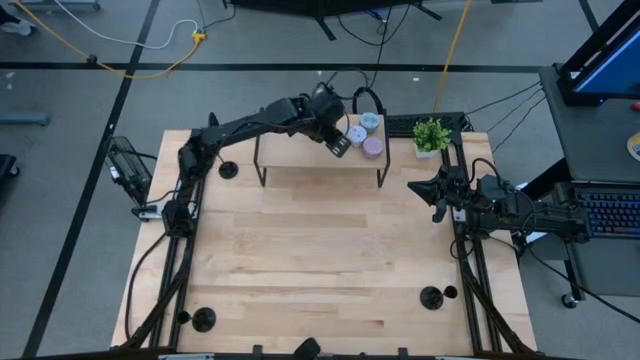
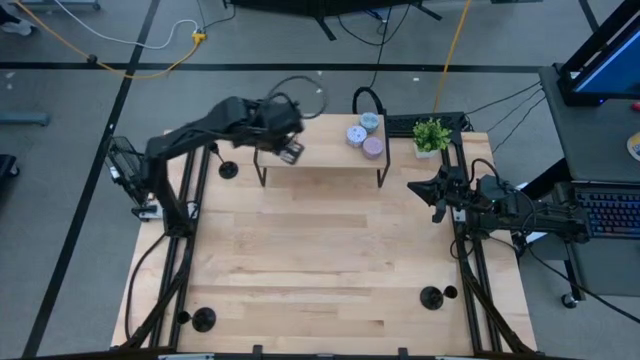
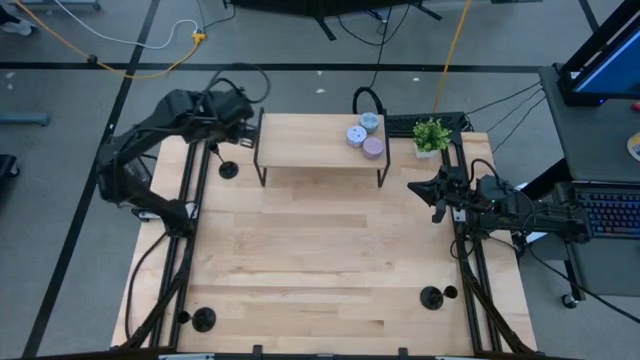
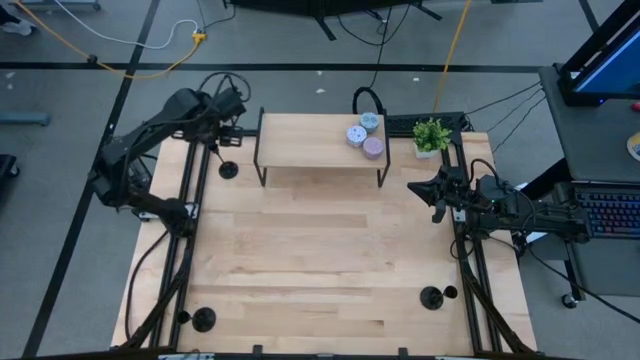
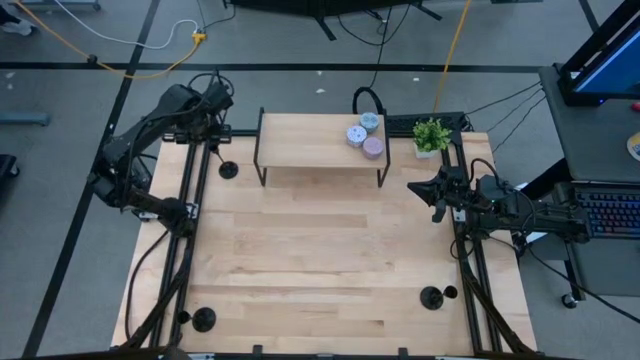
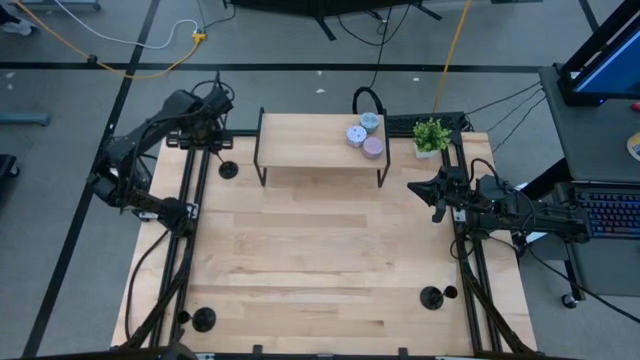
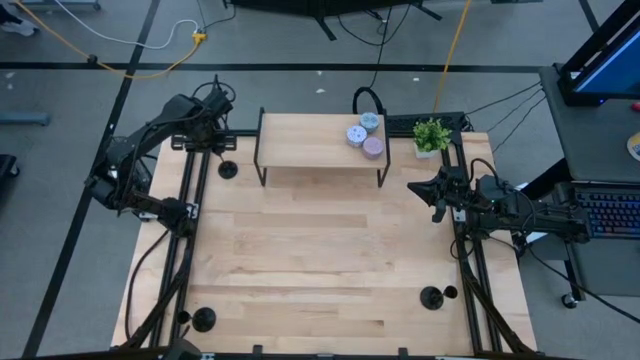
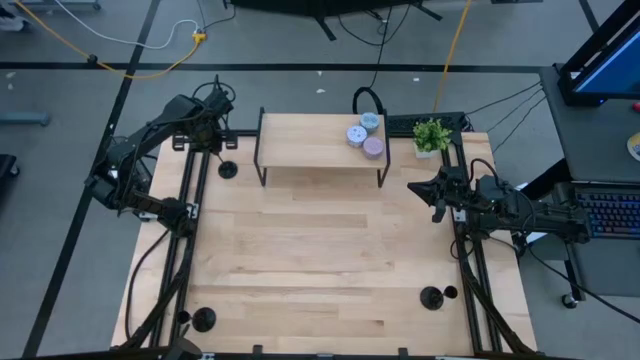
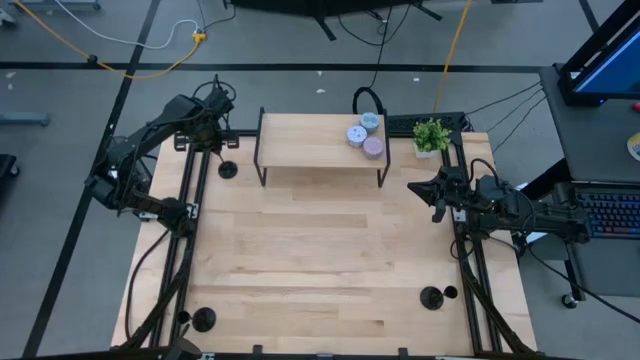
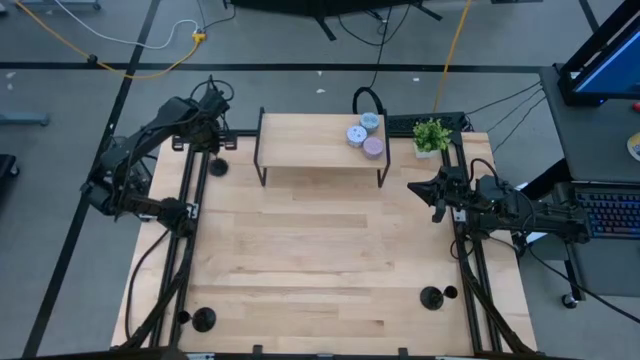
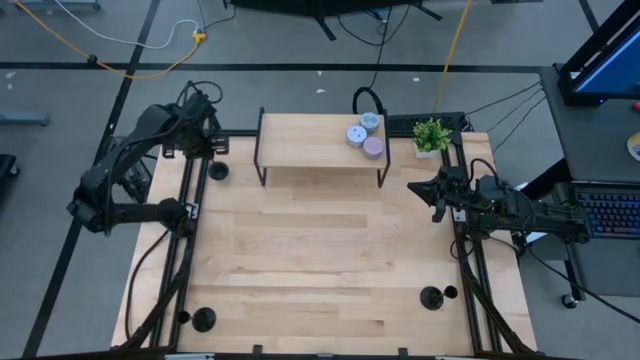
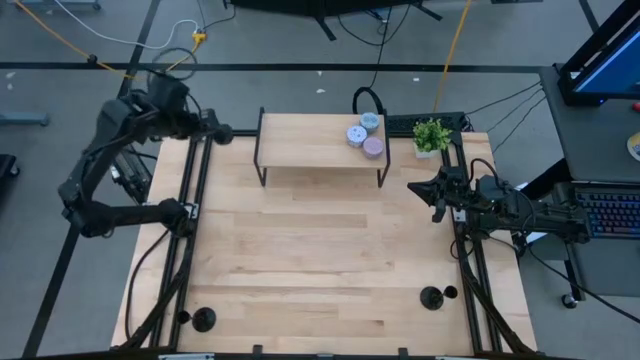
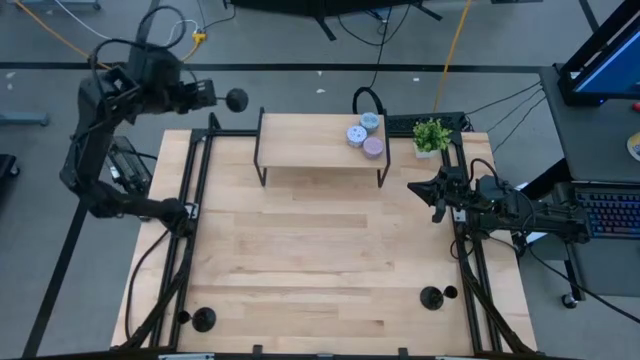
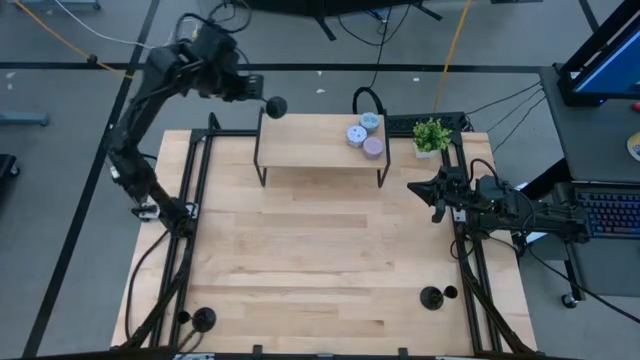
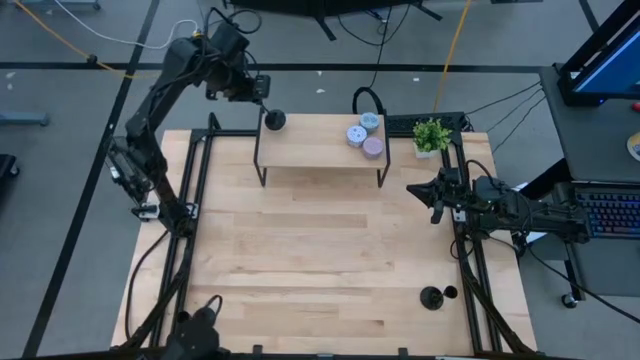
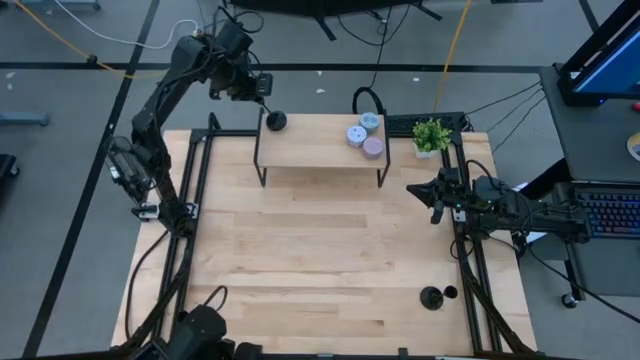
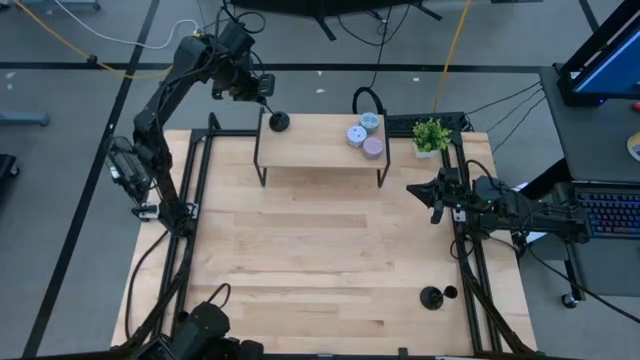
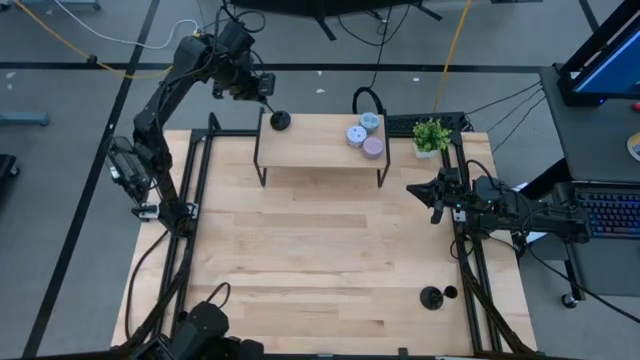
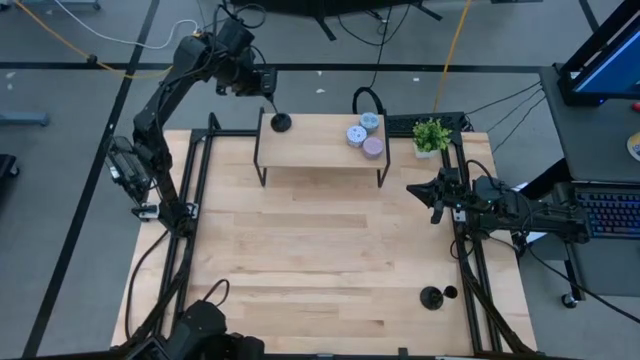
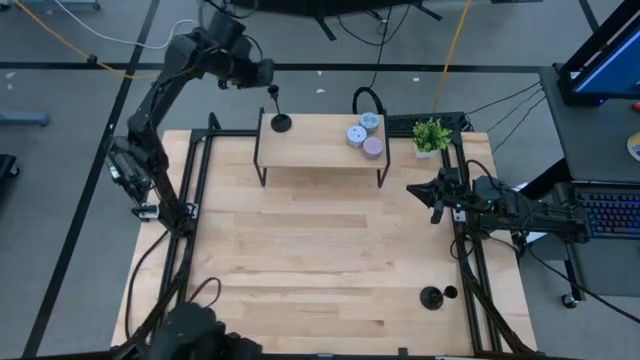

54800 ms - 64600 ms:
Task: Pick & Place candle stick holders
Put the top black candle holder on the shelf

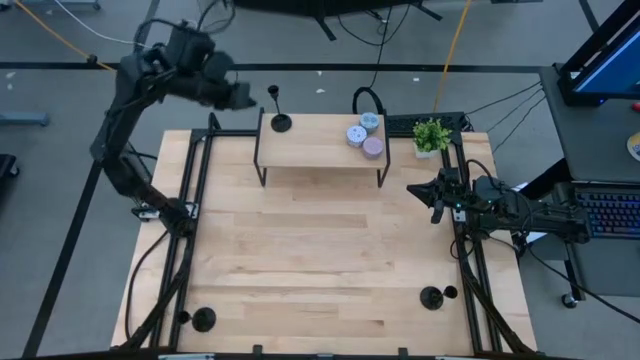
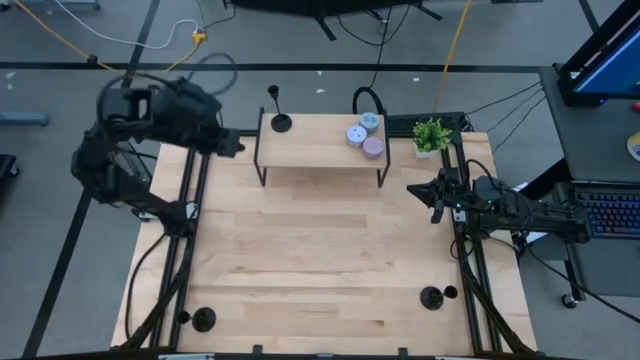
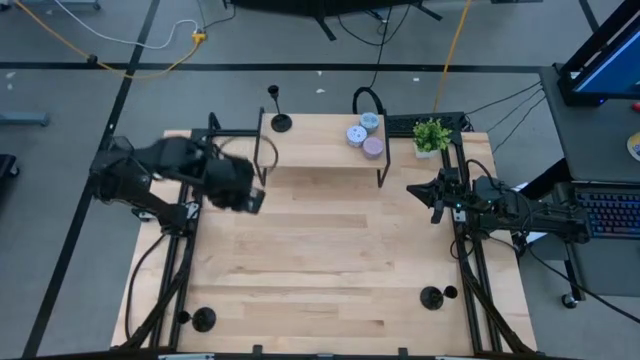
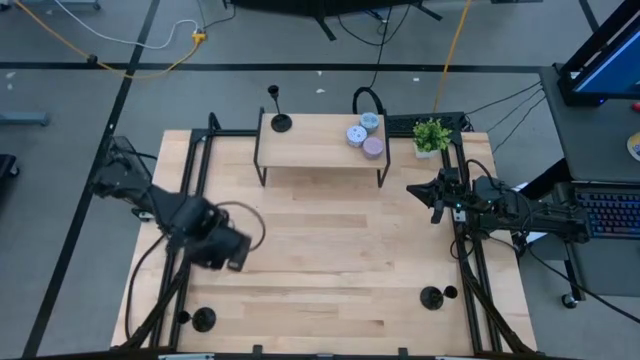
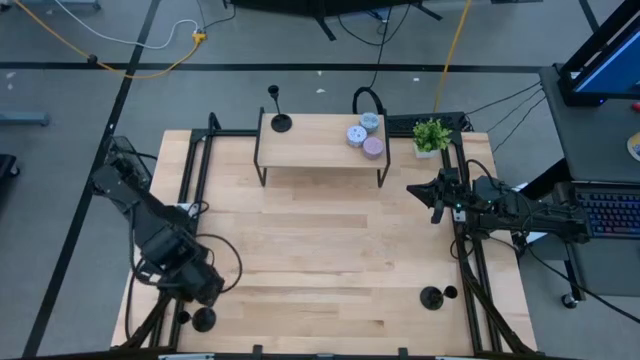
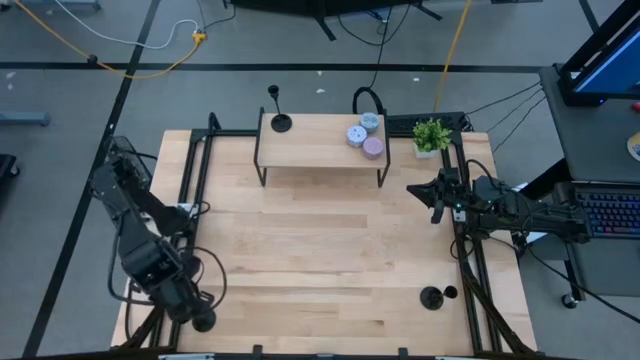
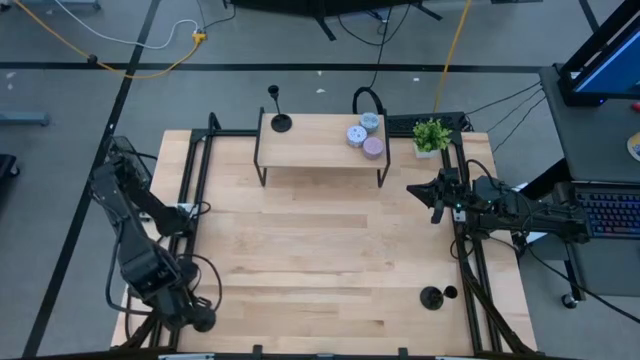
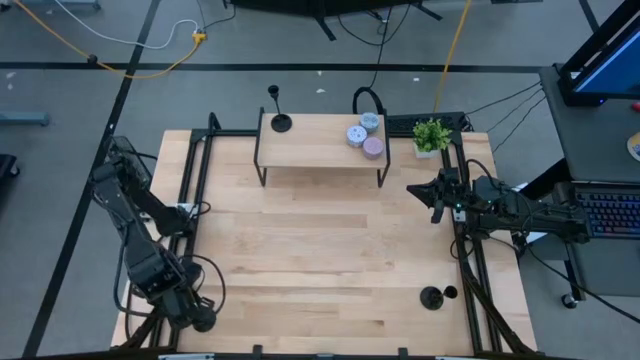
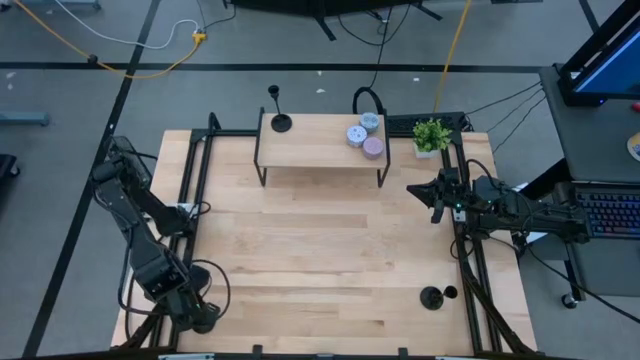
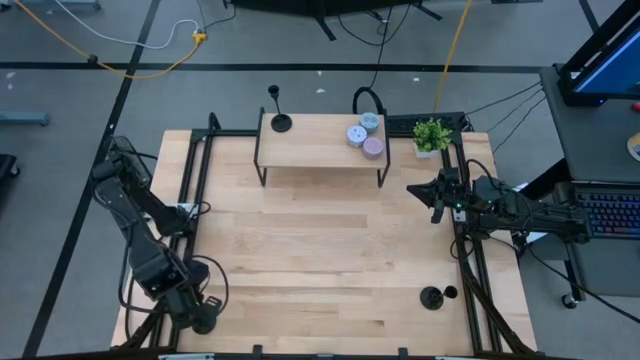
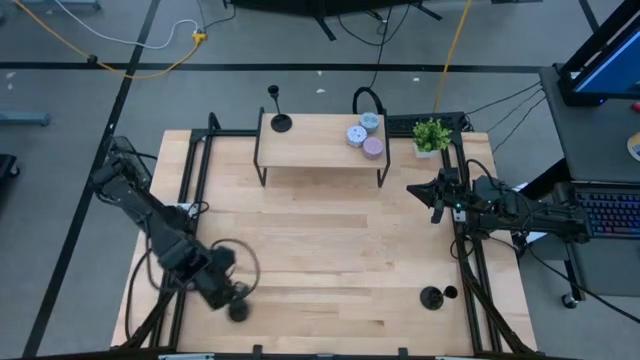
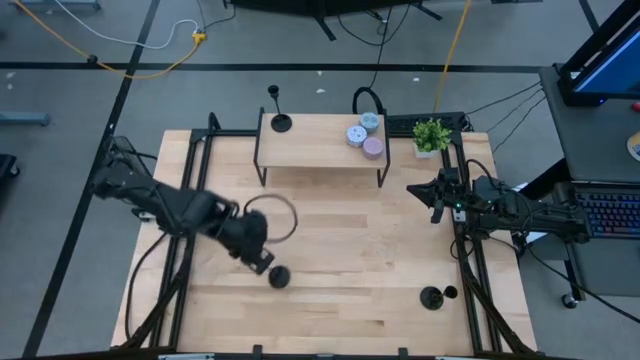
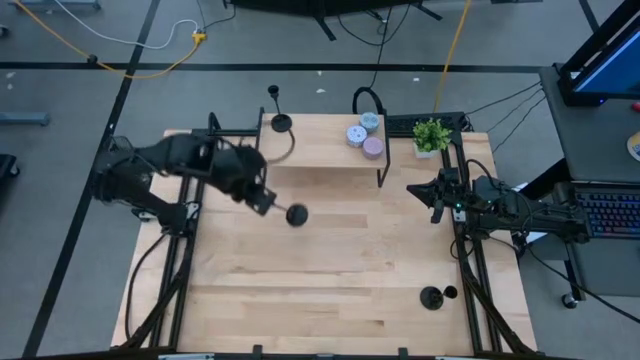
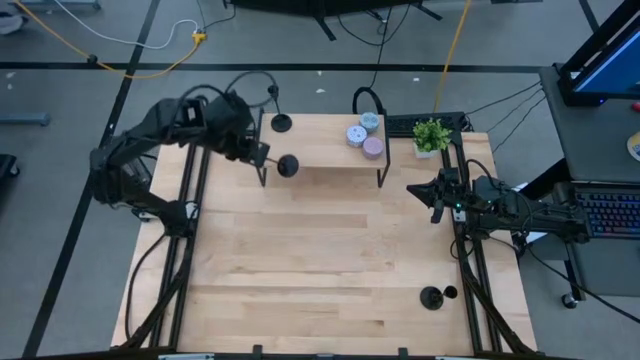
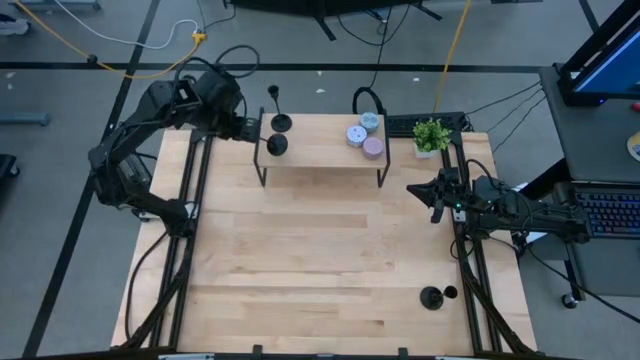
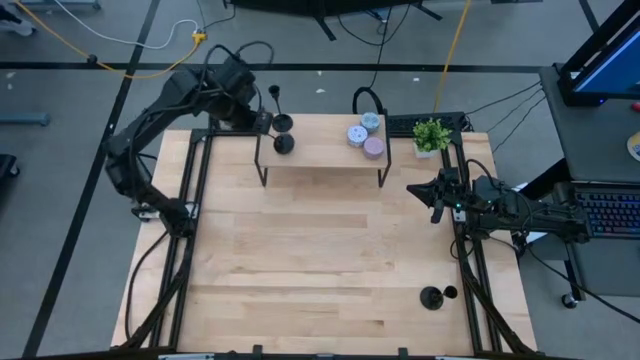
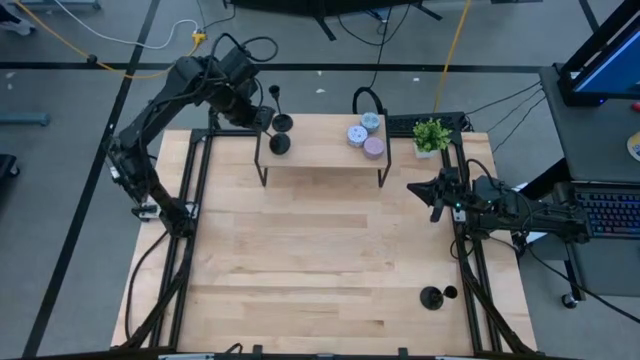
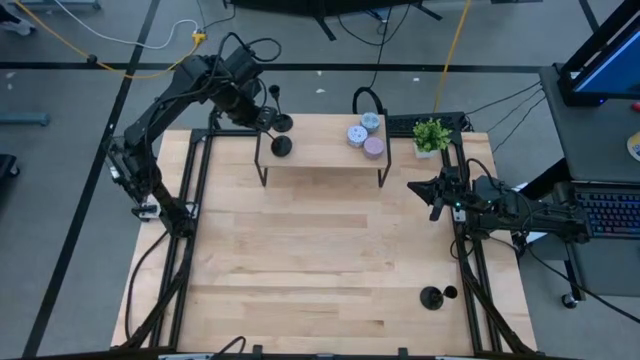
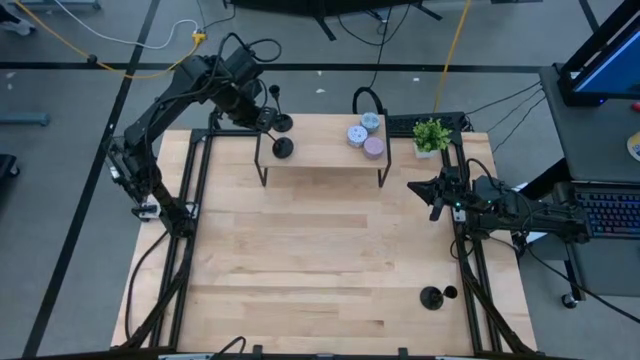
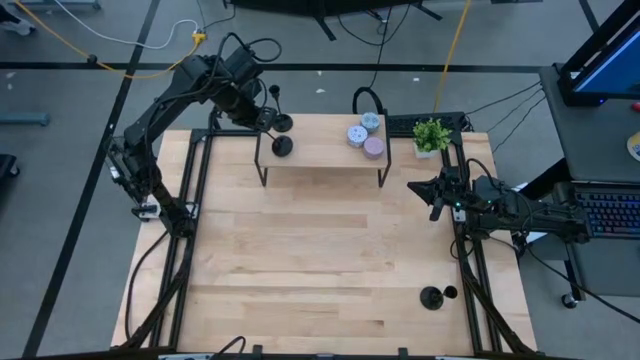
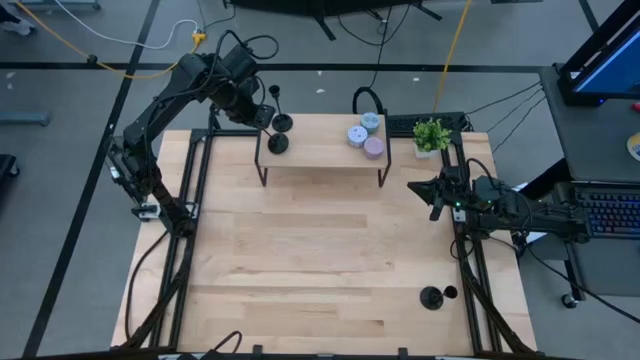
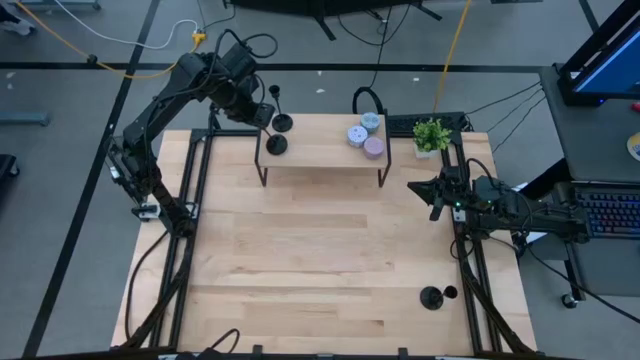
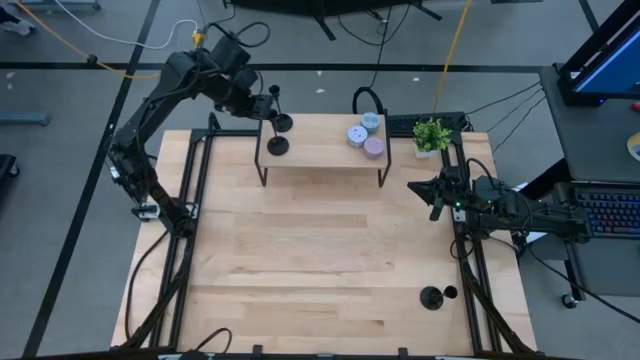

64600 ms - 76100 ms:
Put the left black candle holder on the shelf
